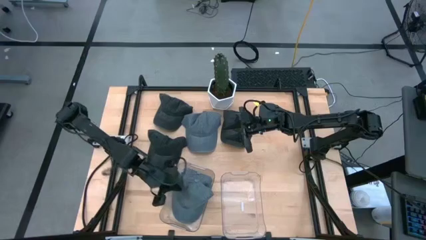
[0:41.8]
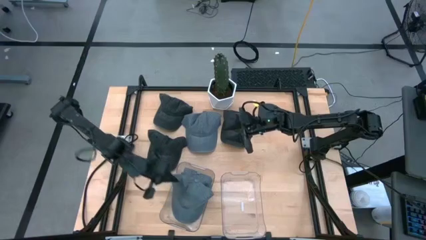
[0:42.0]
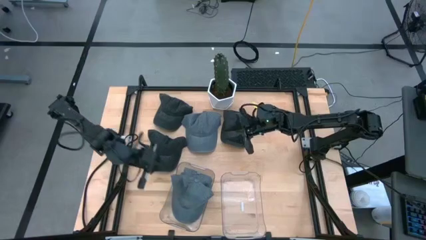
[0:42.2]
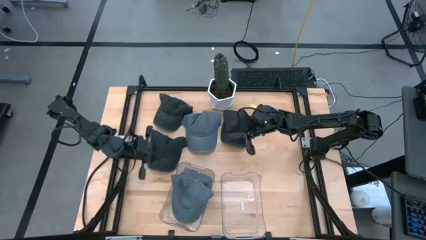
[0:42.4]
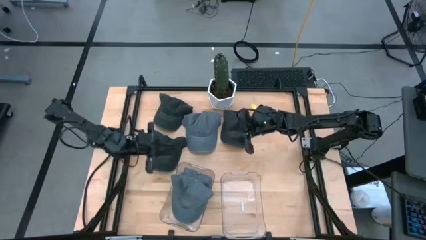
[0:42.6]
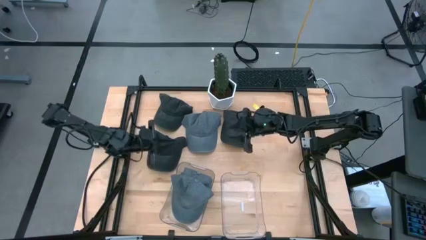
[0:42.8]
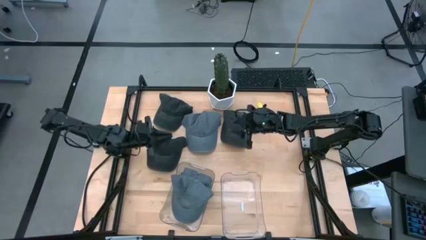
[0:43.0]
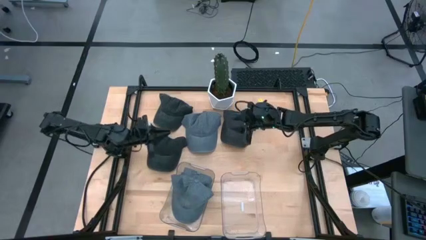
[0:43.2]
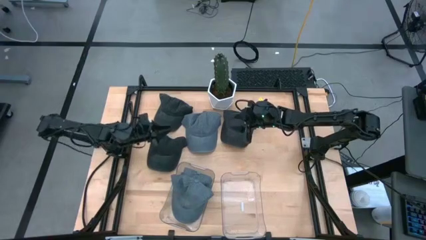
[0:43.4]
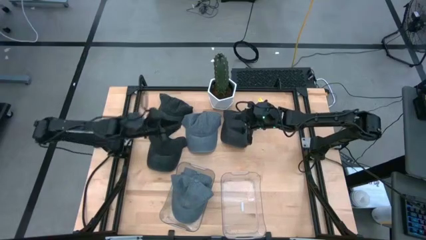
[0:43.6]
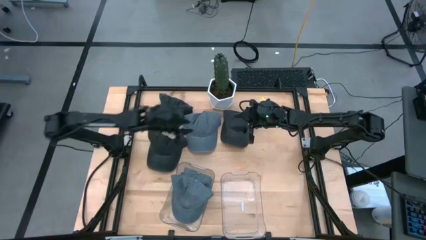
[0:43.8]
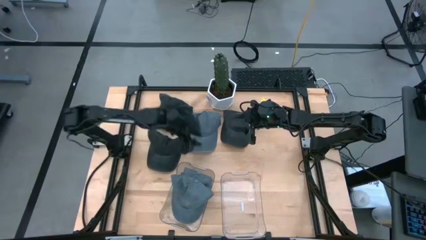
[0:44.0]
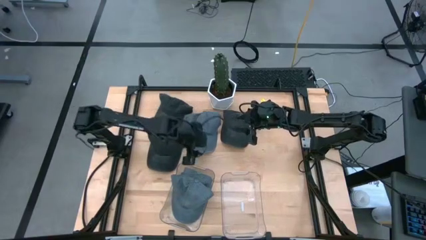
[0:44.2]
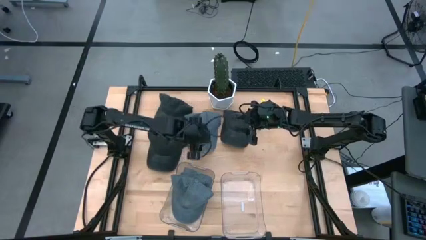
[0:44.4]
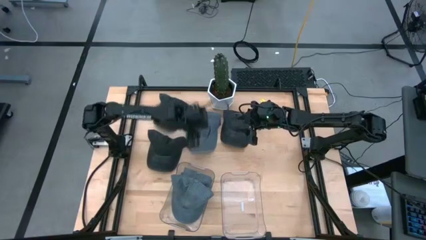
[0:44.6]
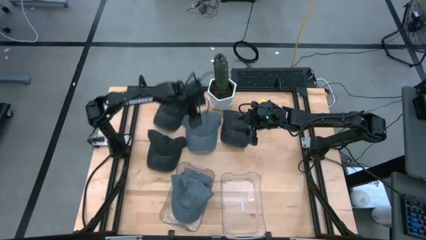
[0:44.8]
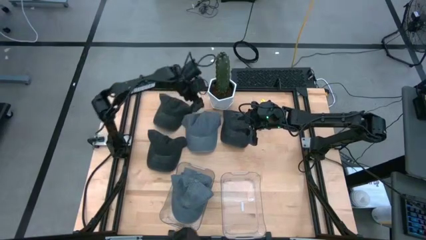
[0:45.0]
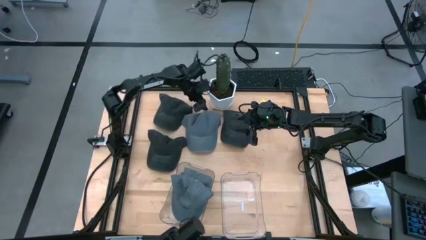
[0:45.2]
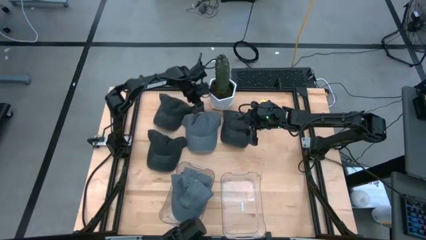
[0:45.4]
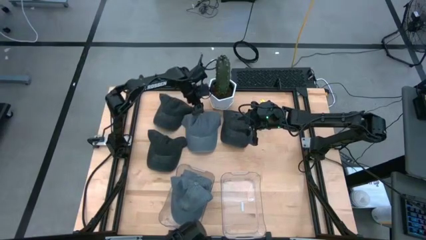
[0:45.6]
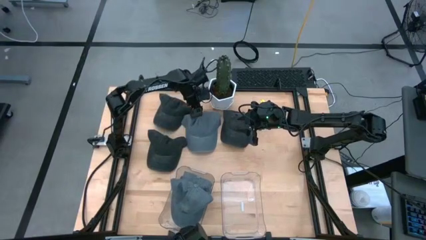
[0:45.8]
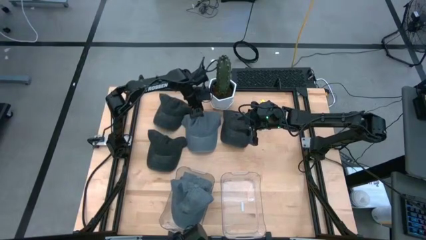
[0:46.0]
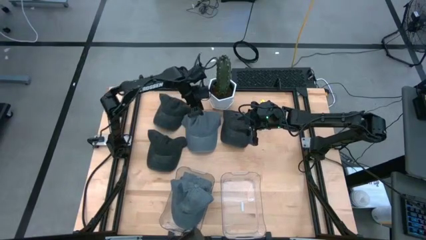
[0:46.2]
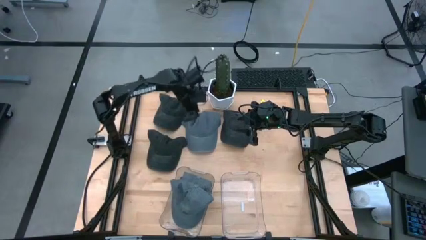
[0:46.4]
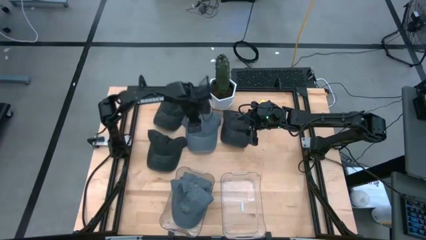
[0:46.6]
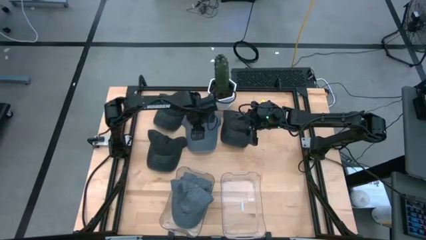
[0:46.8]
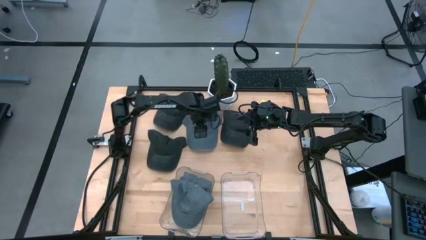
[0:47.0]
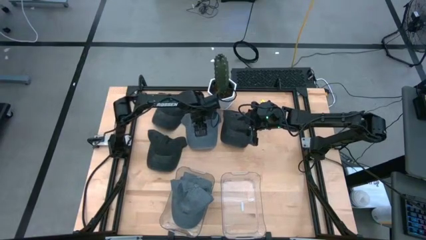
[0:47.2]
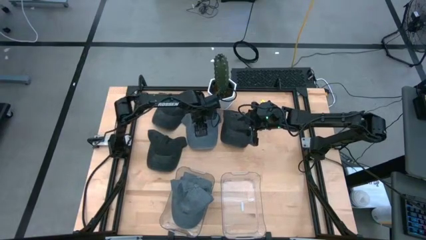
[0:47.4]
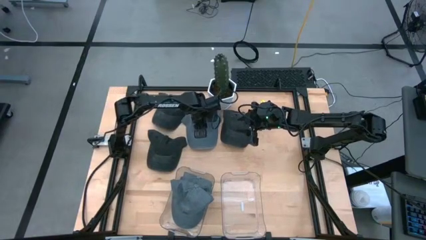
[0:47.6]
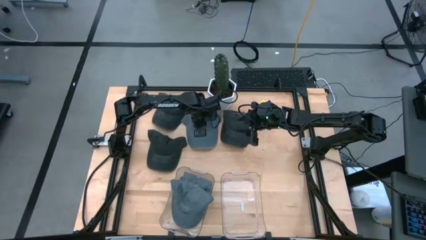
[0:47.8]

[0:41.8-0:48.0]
Task: Pick & Place hat
Put the gray cap into the left transparent bin

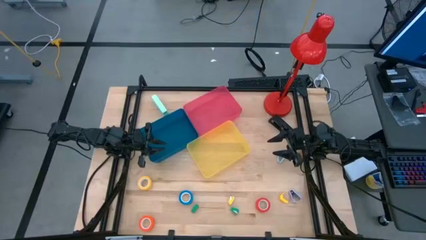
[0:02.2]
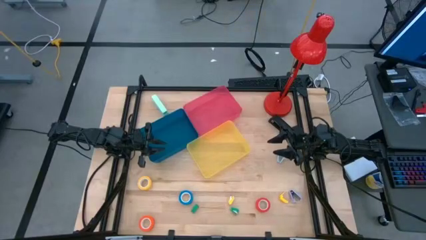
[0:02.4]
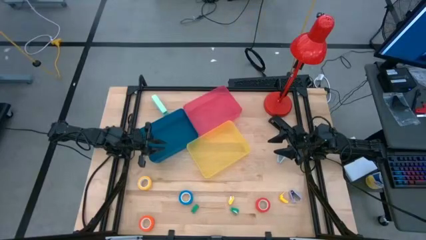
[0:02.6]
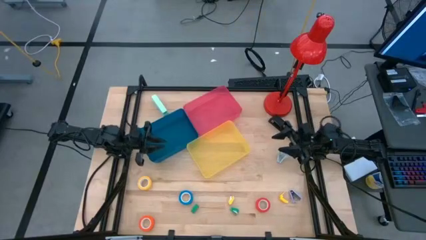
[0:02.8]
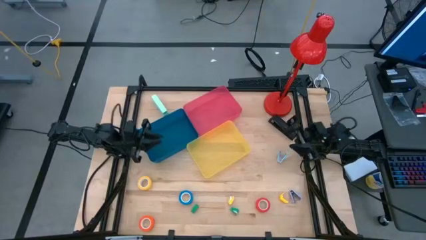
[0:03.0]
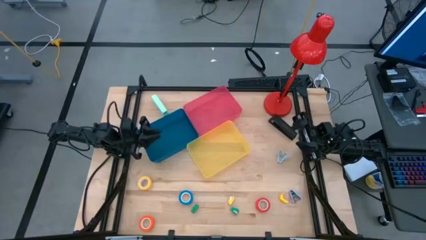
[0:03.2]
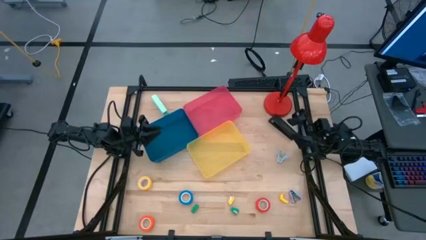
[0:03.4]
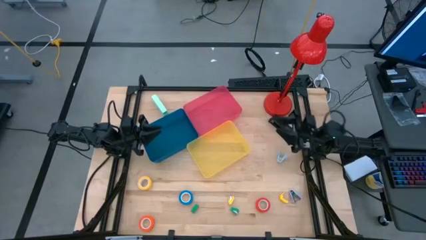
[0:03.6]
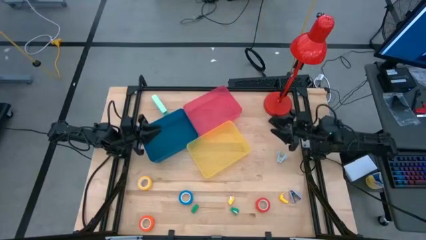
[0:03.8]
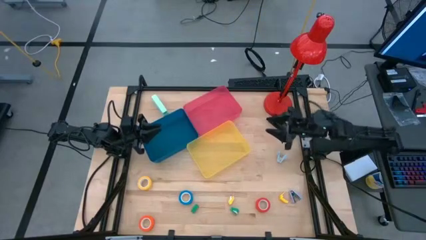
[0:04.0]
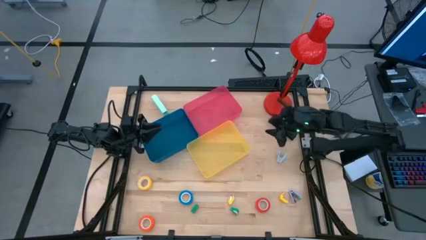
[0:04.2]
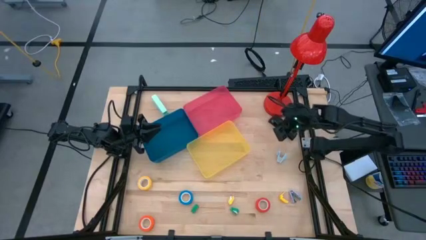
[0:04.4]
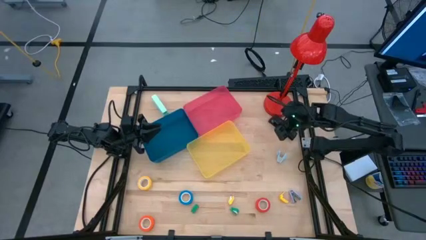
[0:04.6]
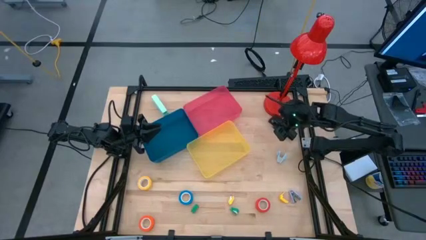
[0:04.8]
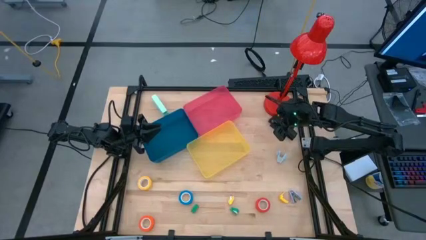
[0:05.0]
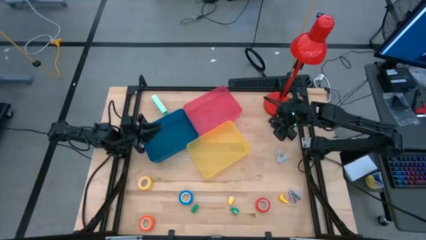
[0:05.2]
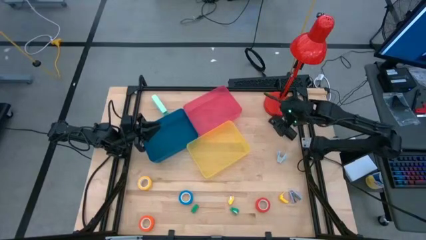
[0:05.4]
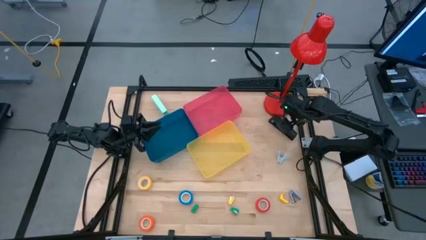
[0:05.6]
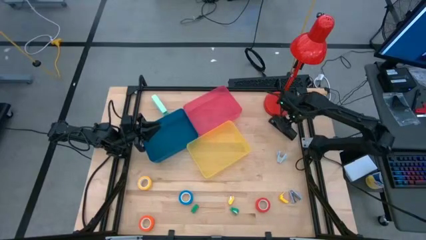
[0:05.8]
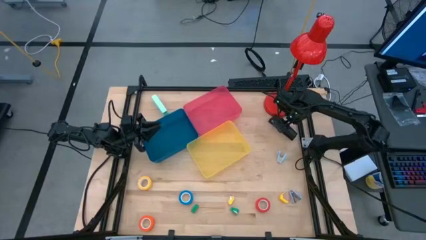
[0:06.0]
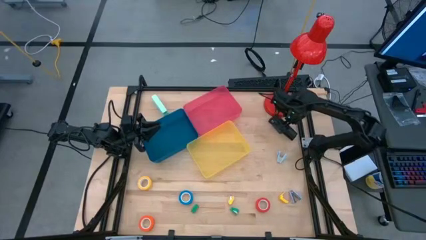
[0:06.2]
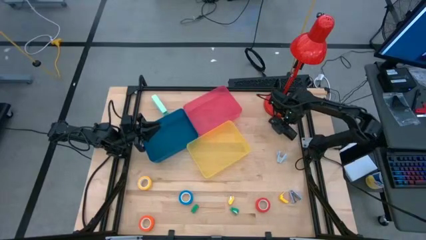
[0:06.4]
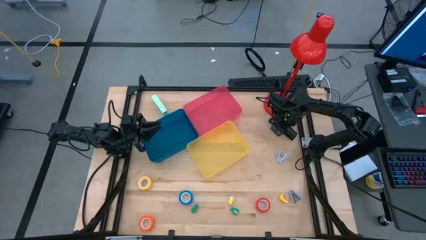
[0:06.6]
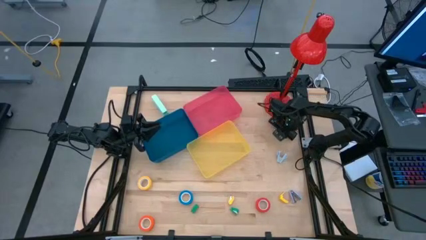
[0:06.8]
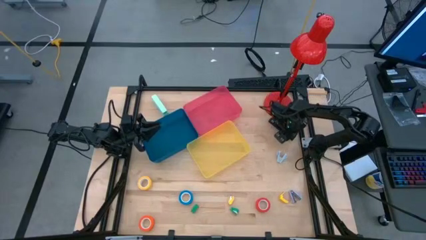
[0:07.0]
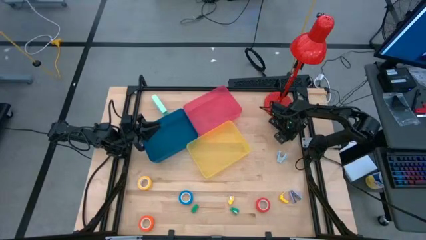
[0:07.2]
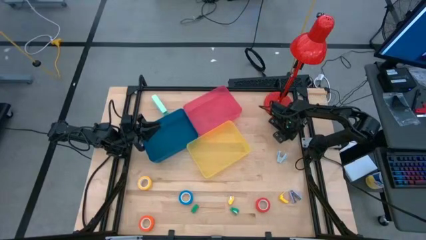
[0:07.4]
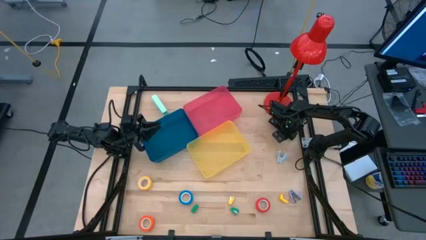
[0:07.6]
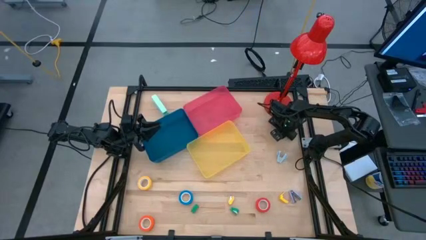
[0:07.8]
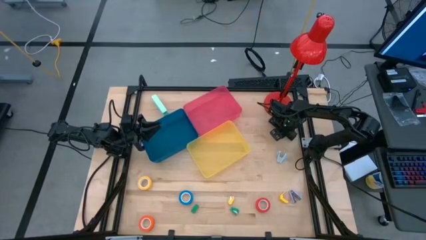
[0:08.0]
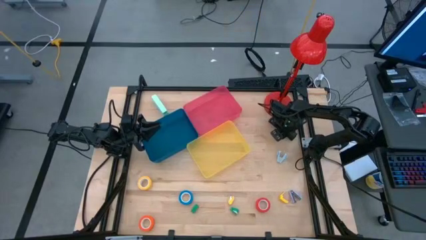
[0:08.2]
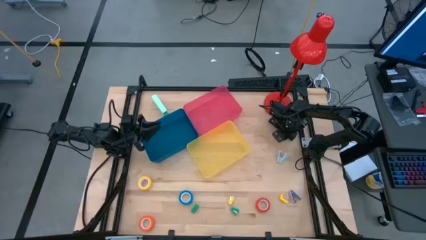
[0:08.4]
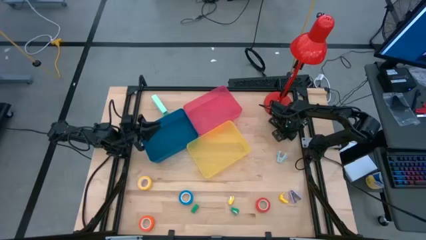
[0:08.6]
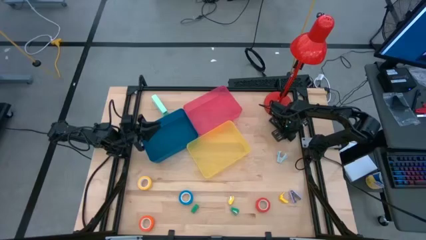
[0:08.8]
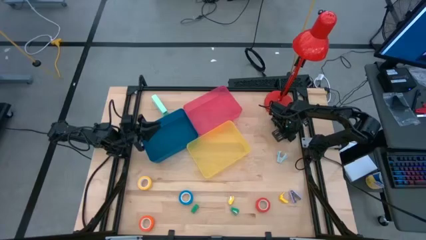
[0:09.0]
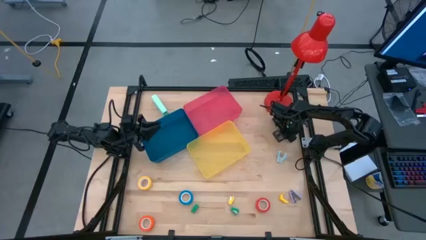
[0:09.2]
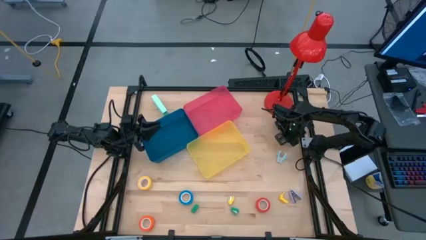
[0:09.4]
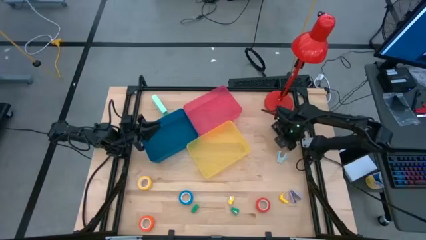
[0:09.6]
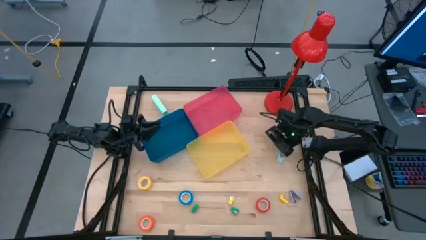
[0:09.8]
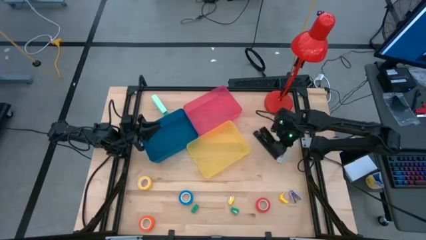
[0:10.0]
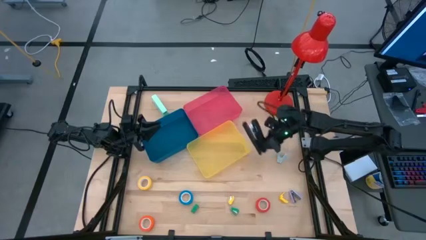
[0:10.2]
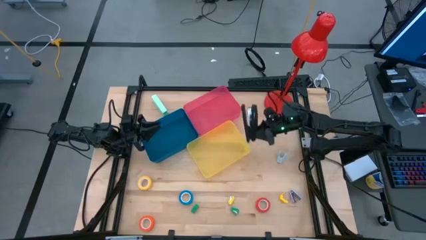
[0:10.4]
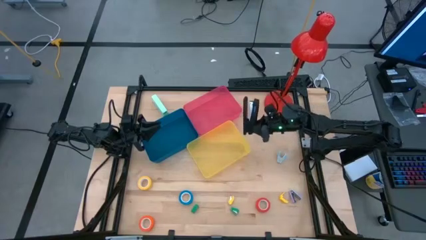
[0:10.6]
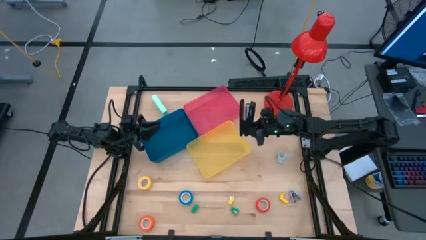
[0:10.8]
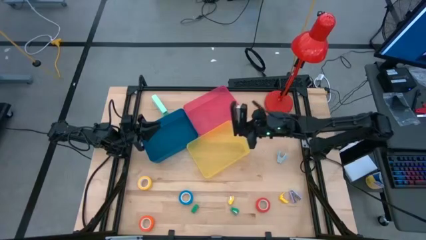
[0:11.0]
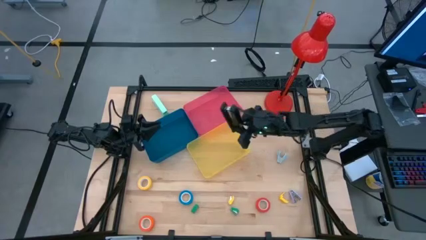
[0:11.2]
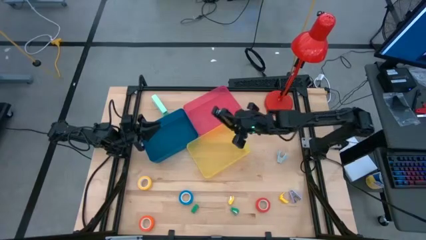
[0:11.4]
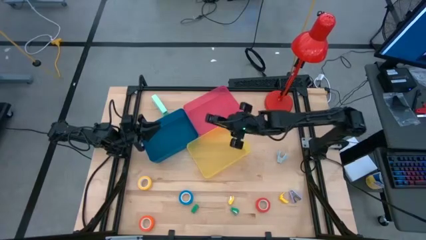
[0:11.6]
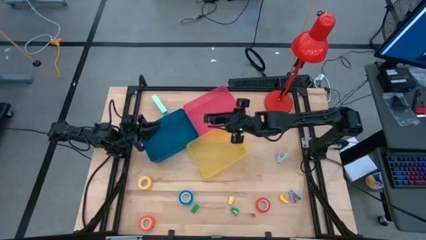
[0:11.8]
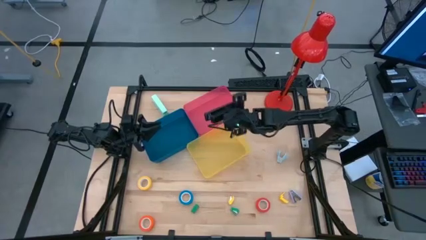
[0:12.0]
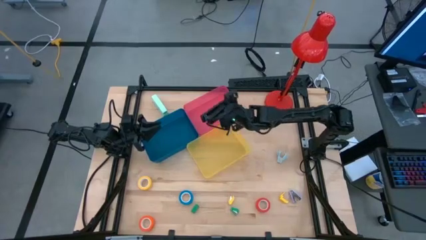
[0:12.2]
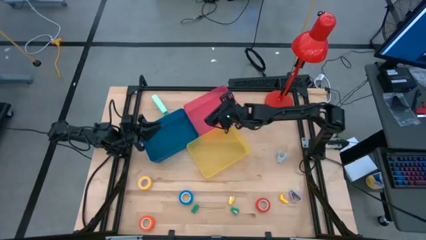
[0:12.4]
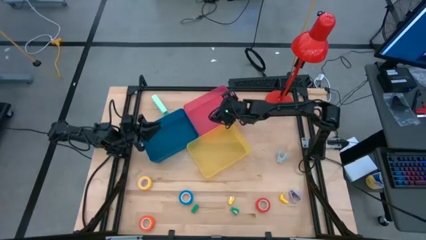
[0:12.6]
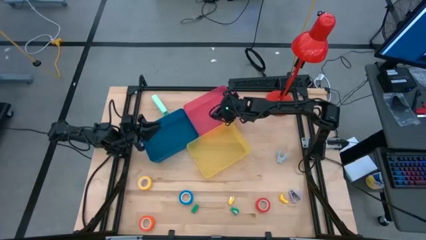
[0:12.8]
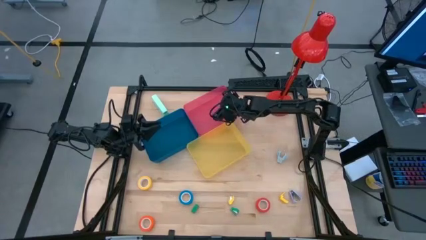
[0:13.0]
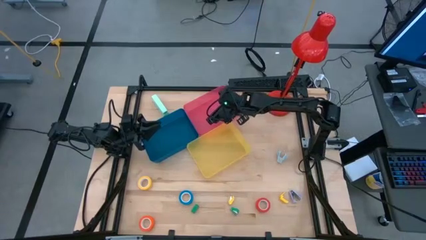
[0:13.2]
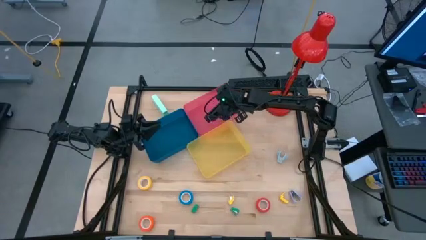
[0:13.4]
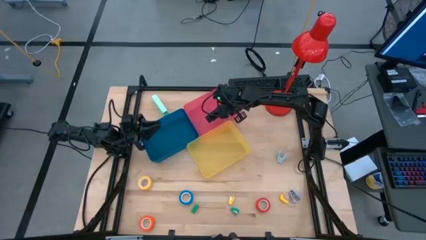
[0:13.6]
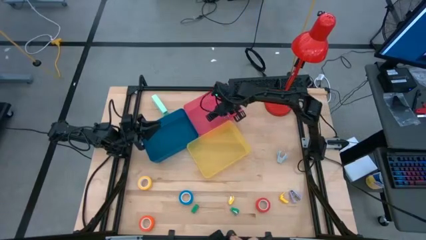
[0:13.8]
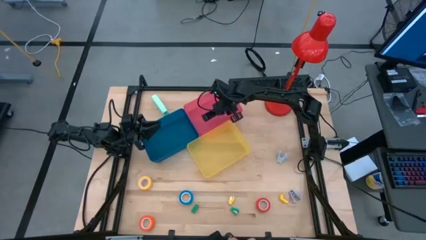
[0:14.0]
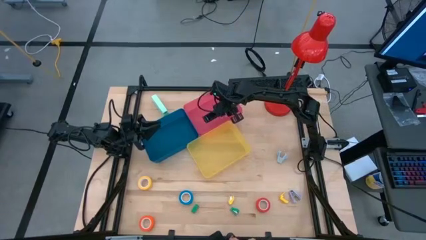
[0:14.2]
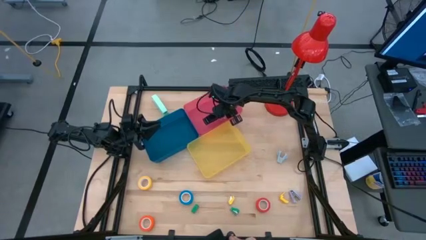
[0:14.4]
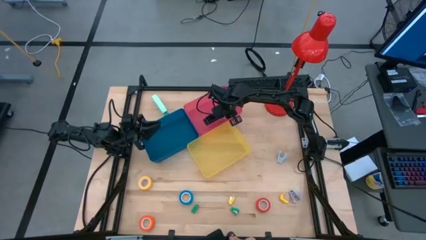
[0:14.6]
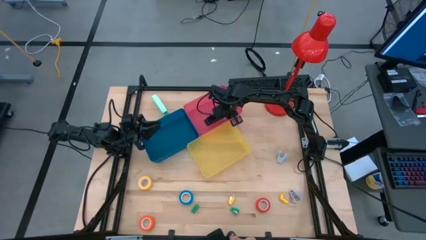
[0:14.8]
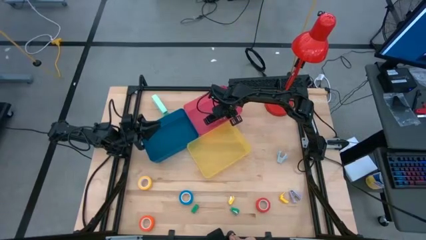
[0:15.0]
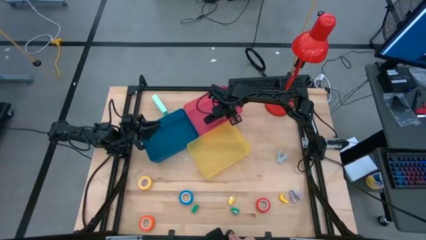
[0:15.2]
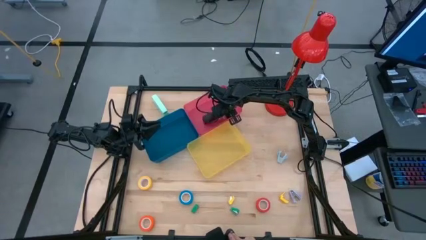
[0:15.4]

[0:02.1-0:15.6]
Task: Pick and place Stapler, Stapler remover, tape
Put the black stapler into the red bin
